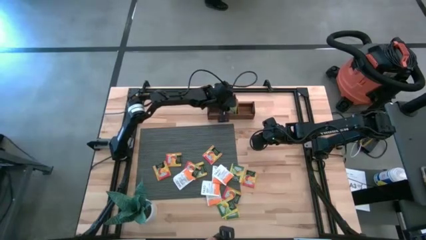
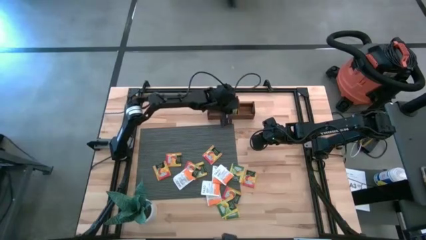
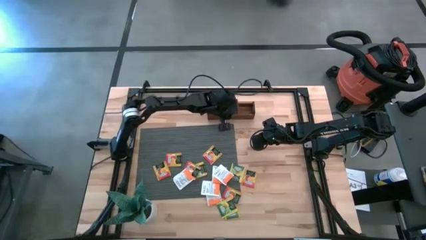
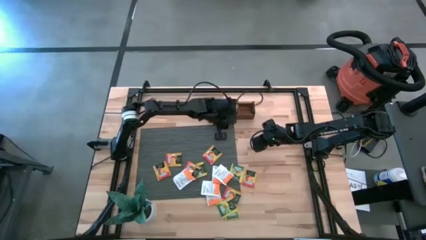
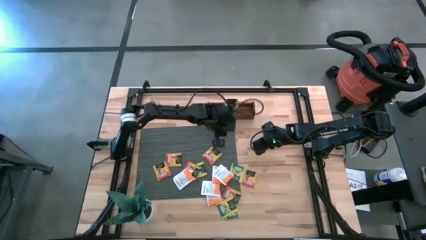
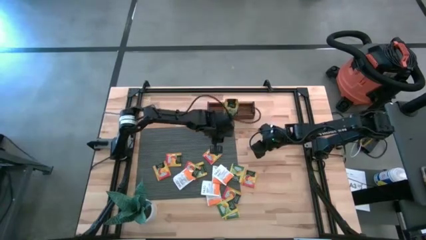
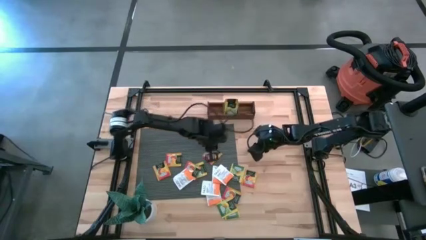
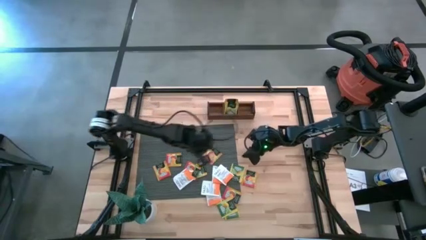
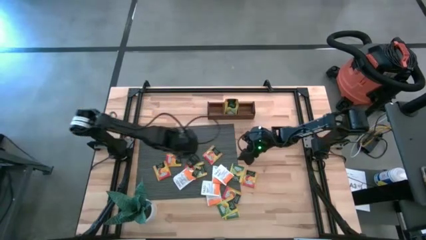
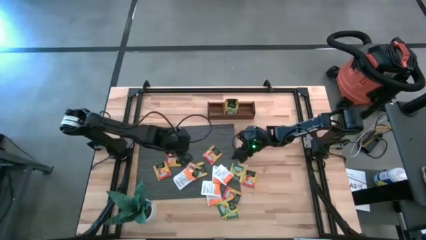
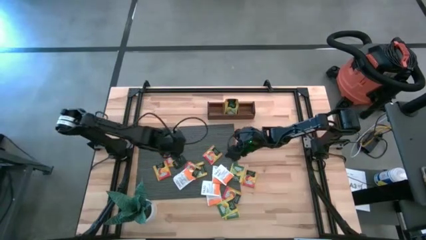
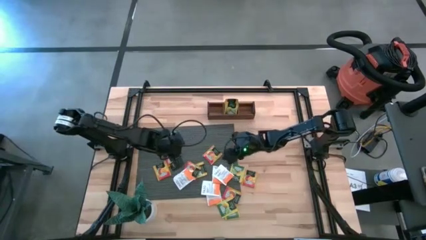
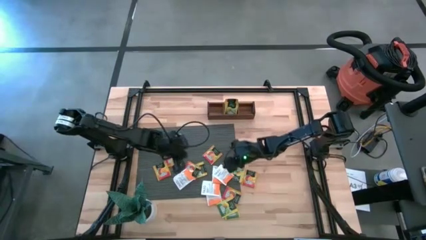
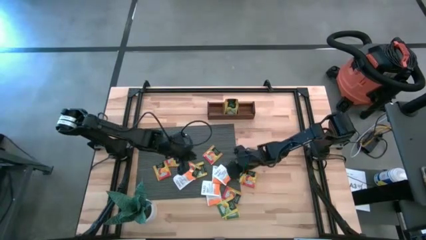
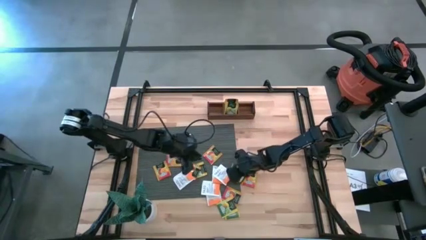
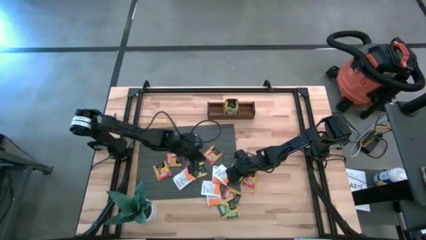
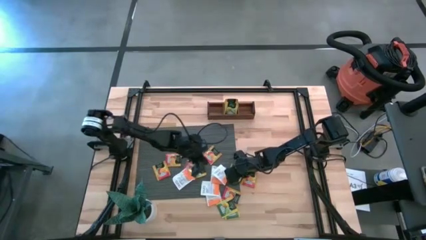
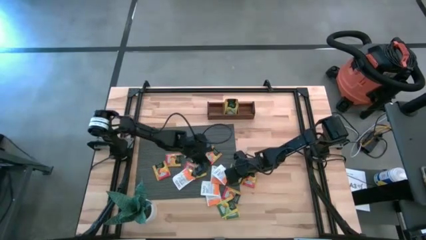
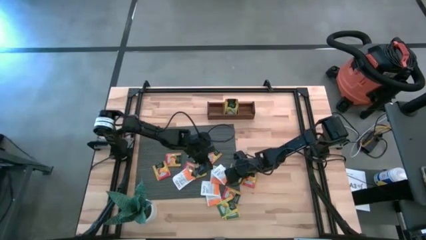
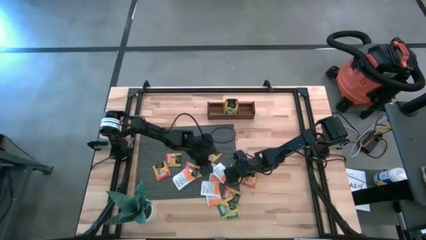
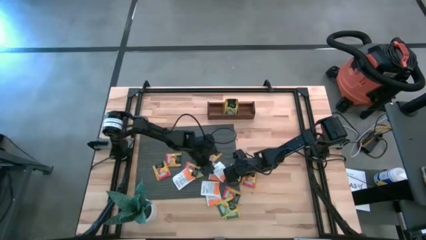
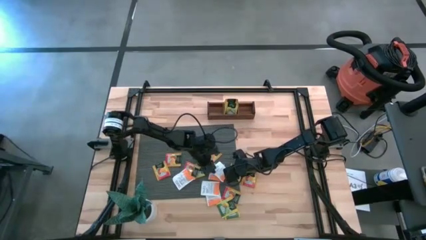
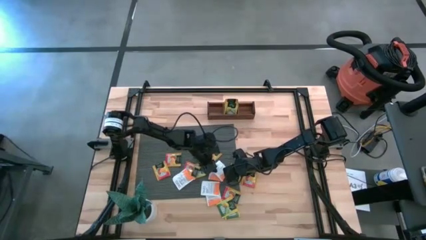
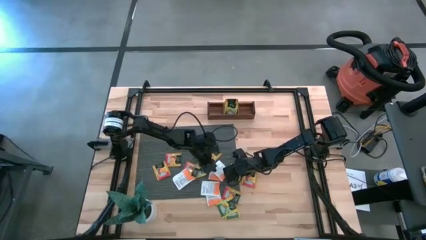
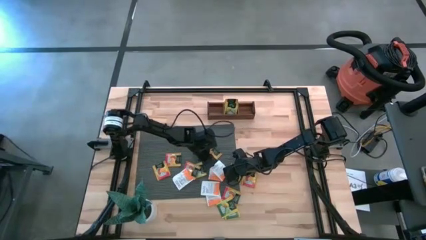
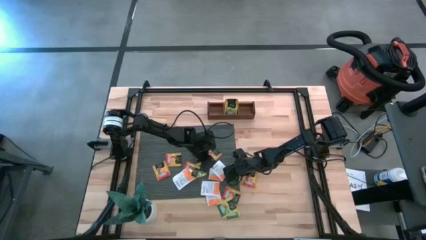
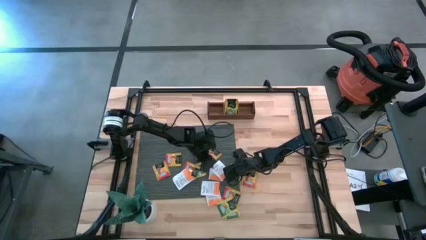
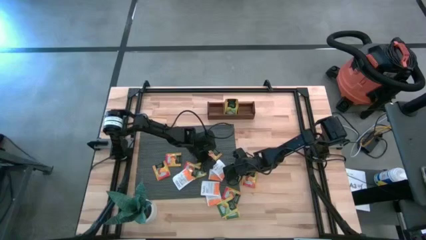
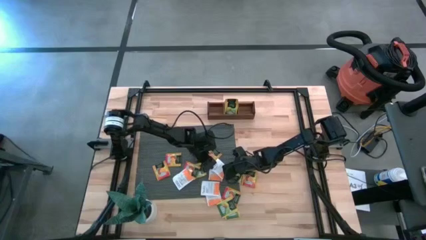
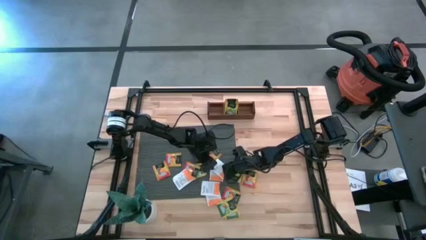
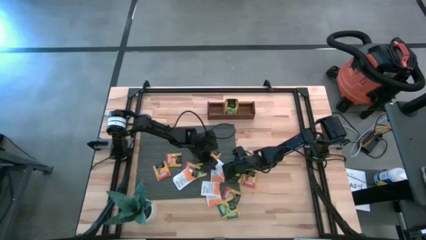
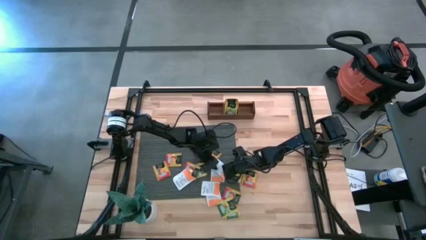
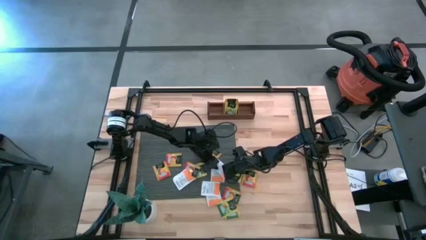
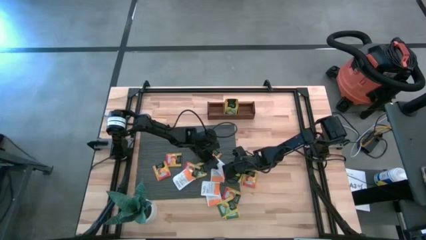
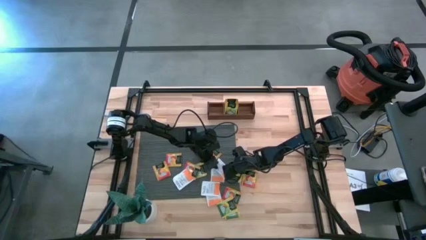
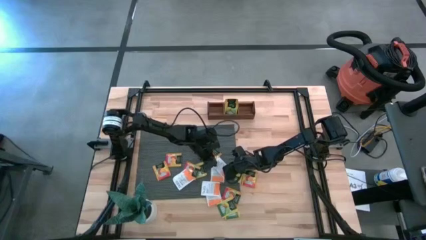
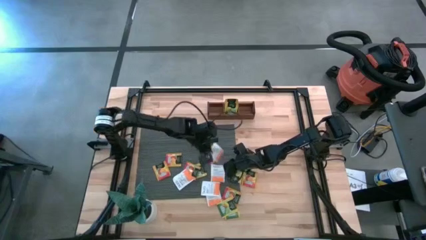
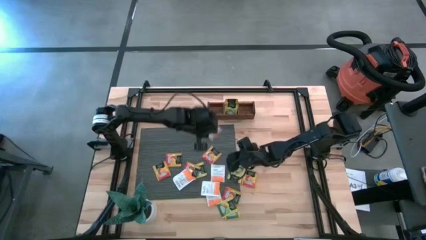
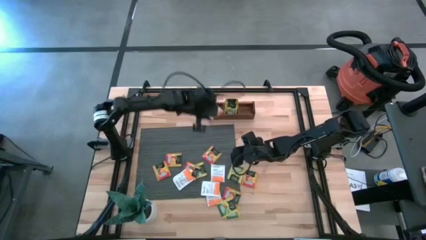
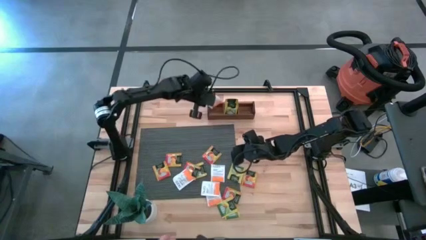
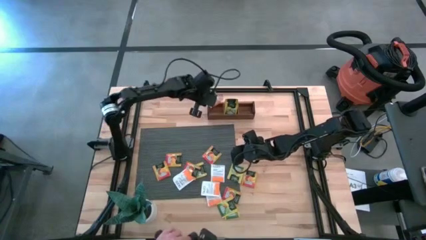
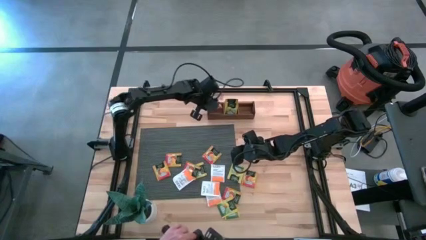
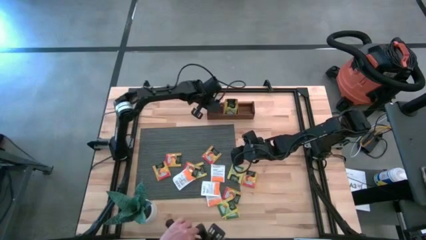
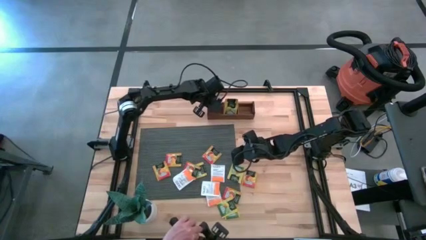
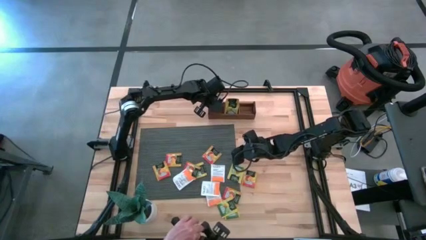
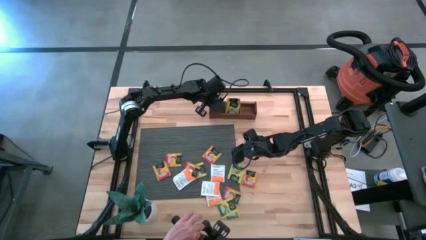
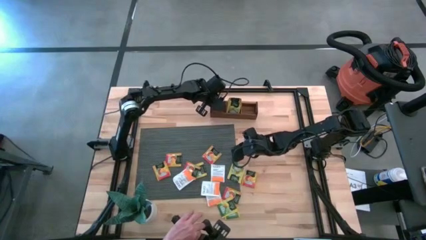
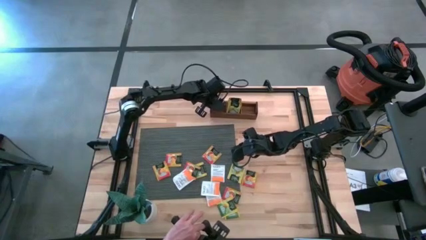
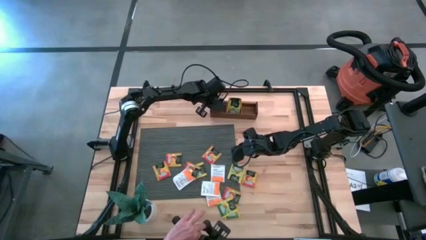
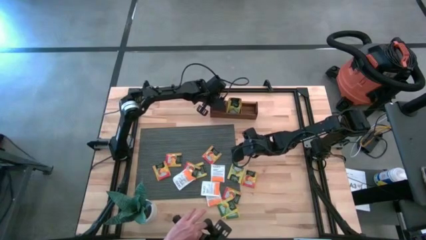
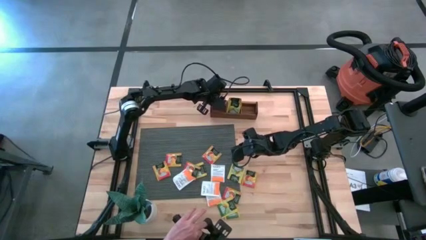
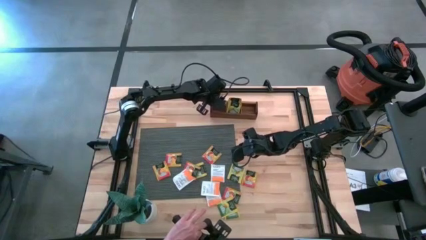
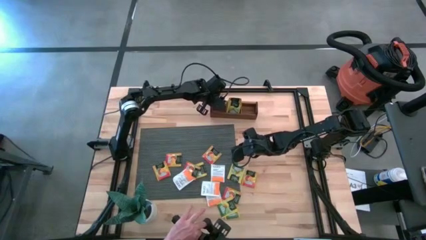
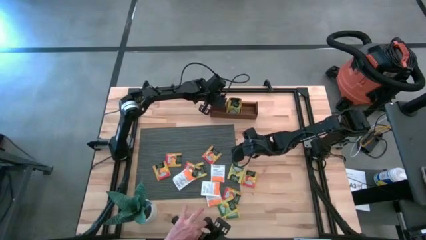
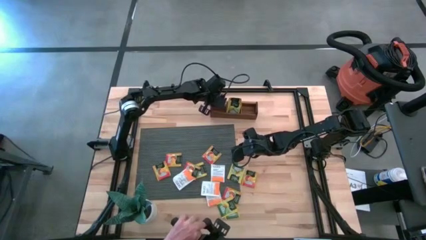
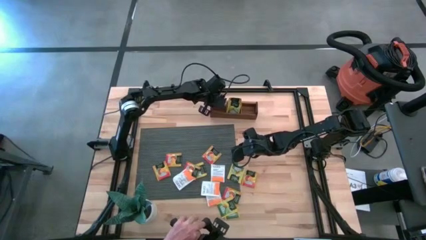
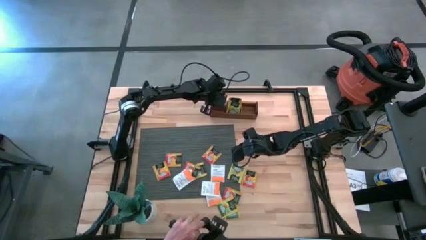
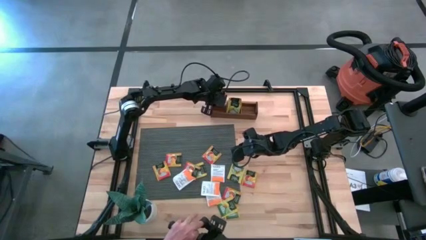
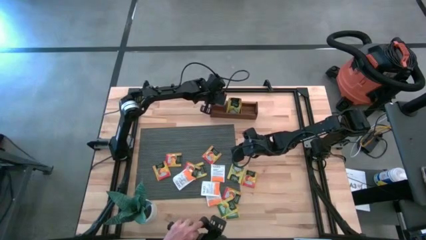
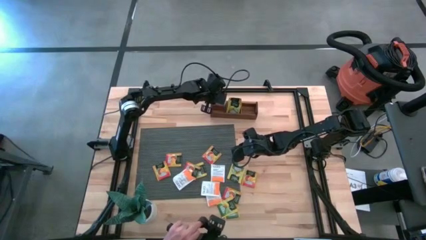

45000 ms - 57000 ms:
Task: Pick & Place Tea
Put the white tea bag into the left section of the wooden organizer

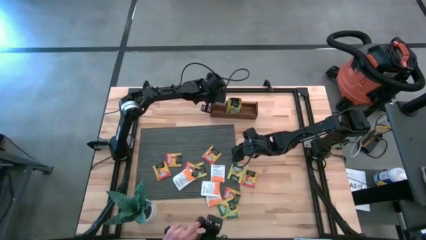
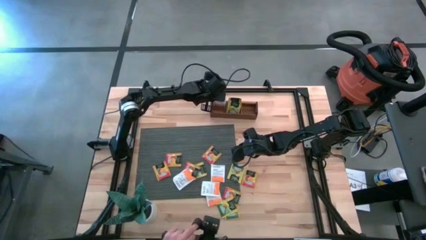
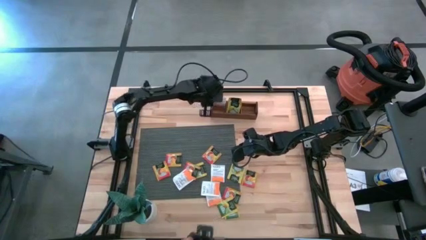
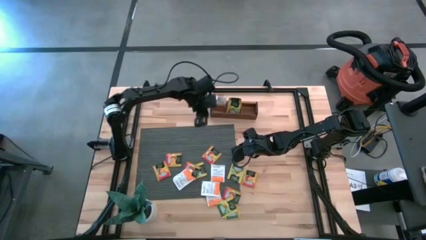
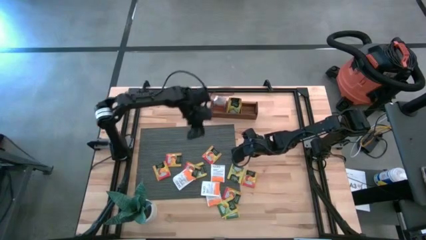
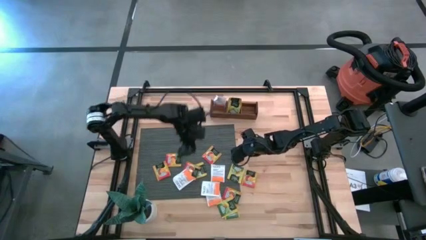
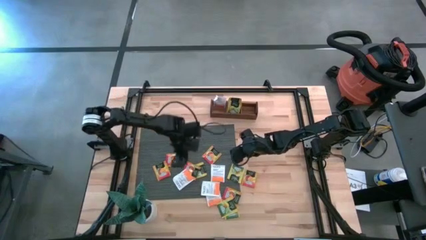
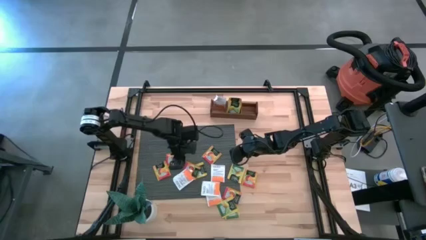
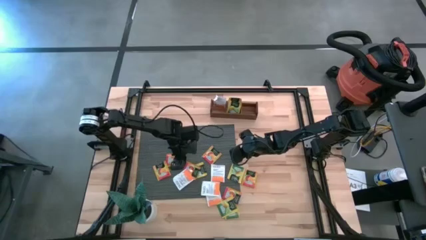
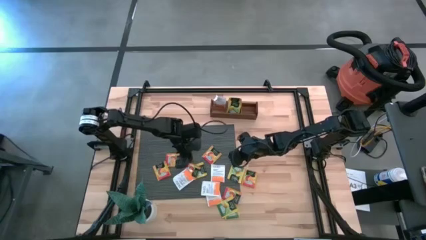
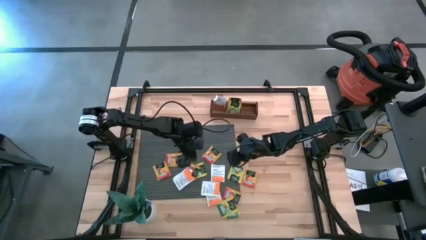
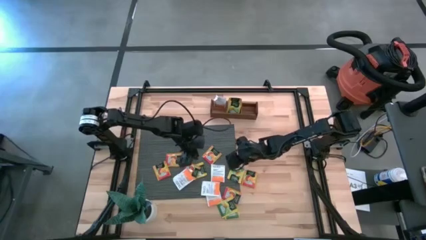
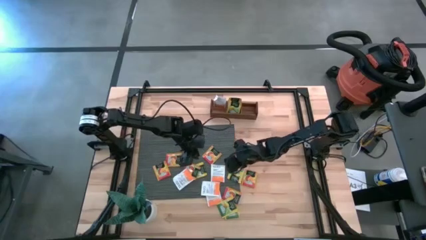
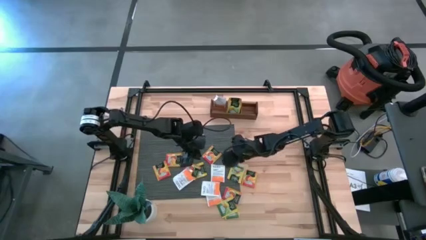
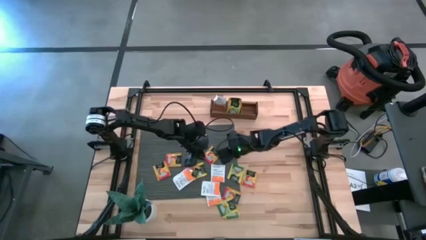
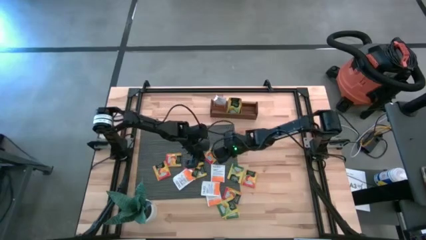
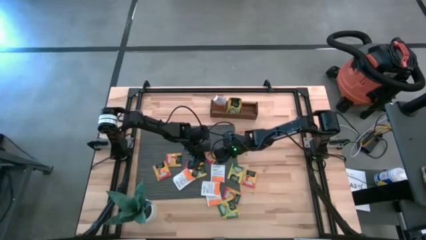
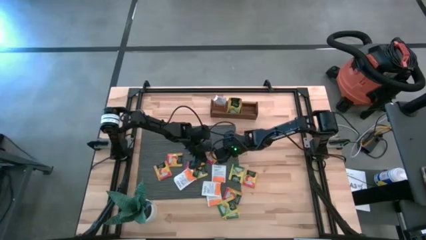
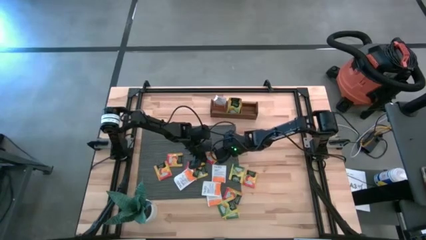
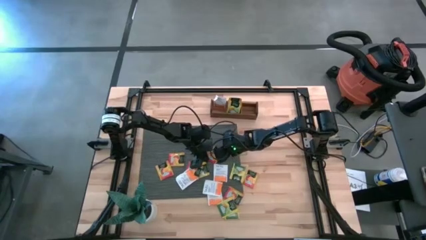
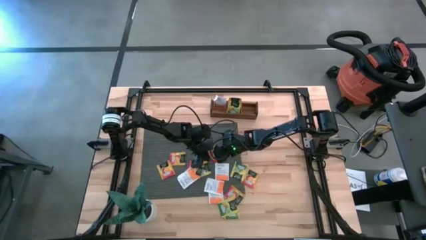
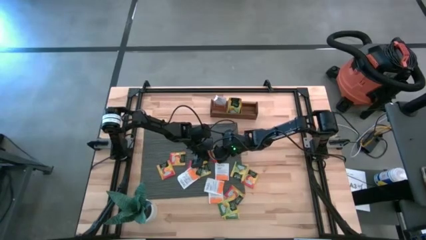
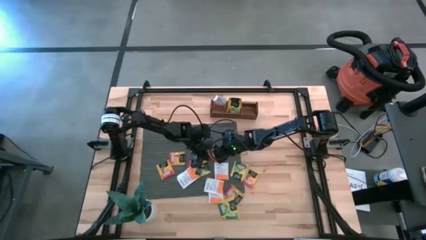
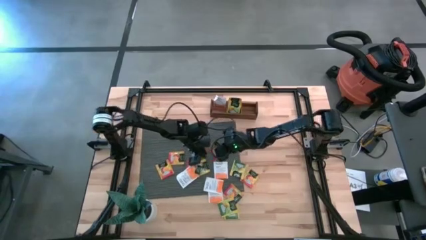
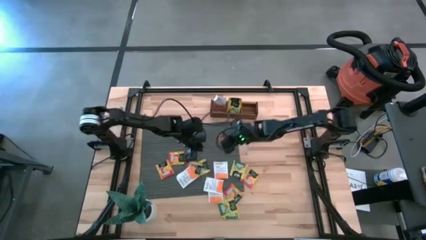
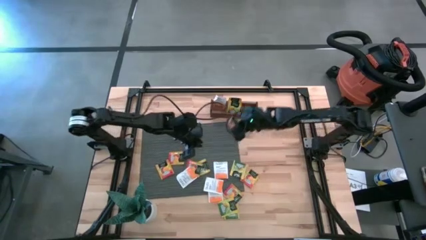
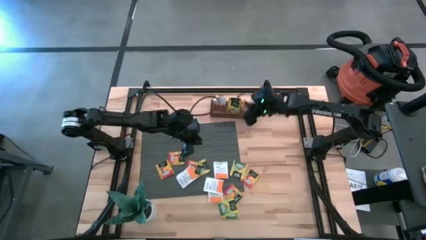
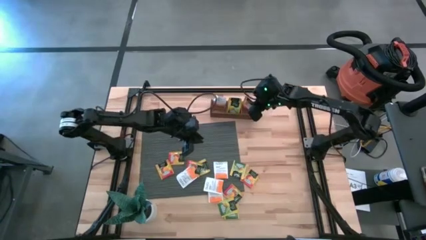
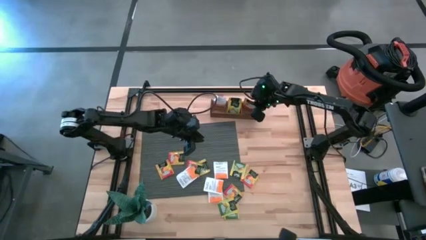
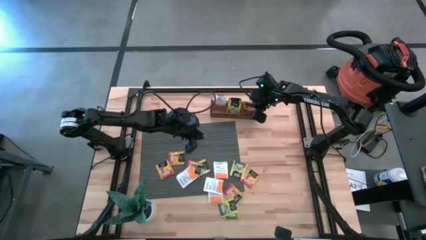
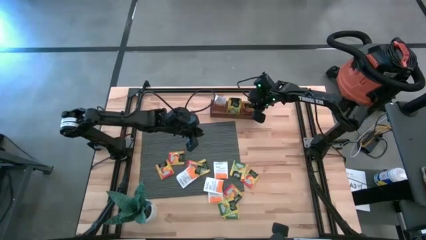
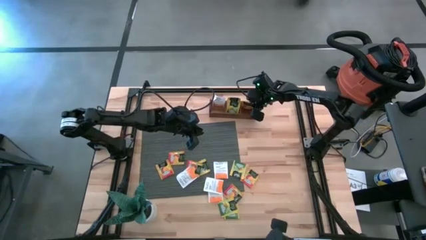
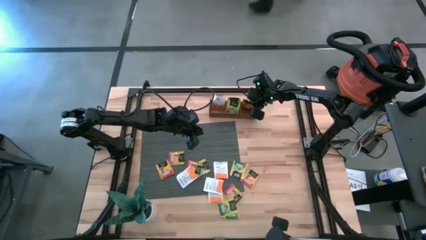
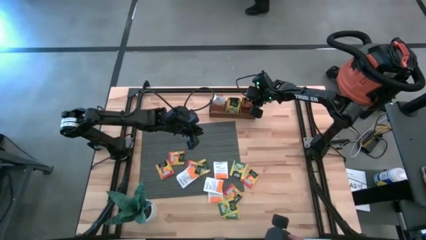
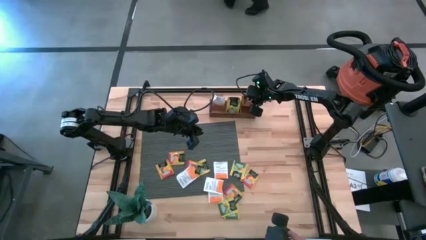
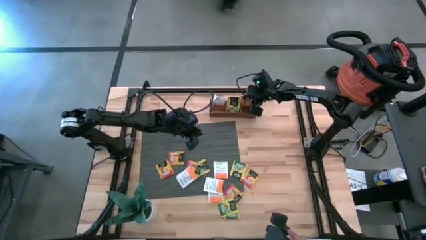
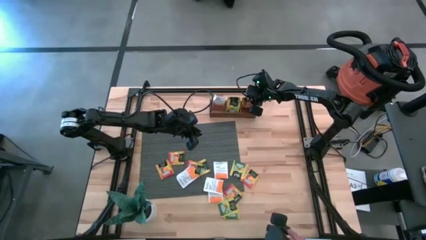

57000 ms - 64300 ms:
Put the orange tea bag into the right section of the wooden organizer
